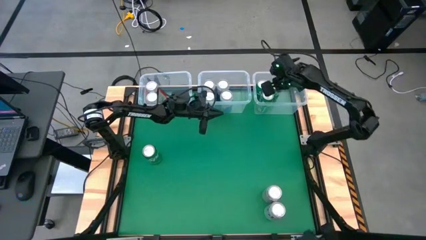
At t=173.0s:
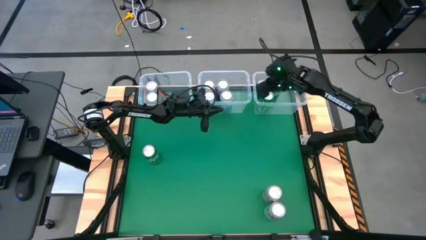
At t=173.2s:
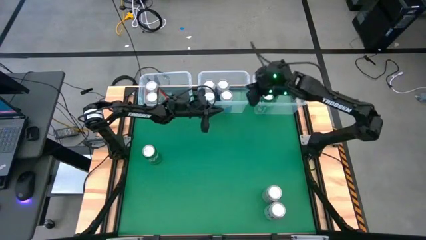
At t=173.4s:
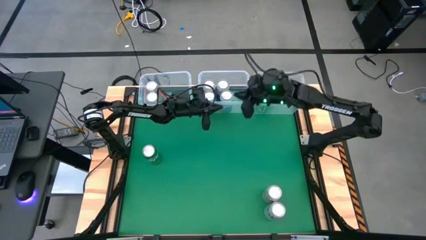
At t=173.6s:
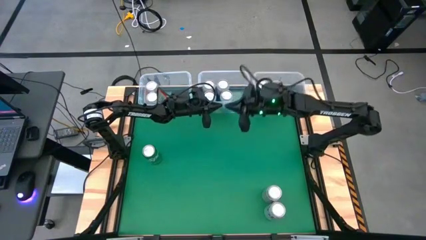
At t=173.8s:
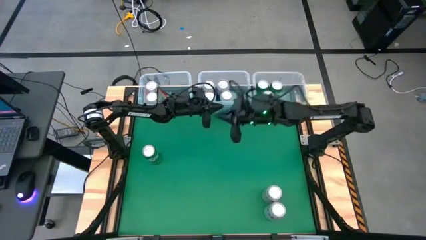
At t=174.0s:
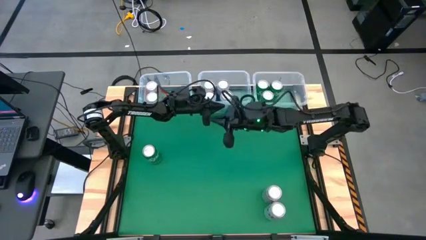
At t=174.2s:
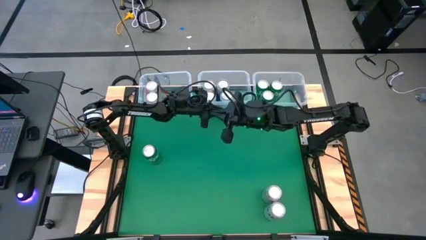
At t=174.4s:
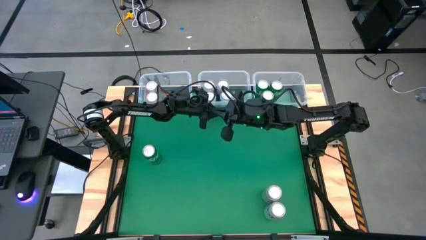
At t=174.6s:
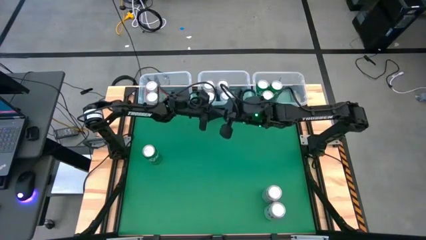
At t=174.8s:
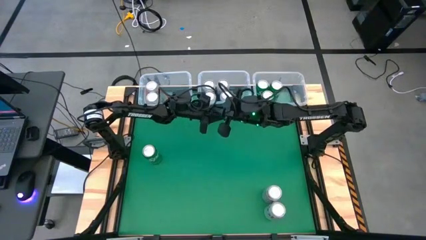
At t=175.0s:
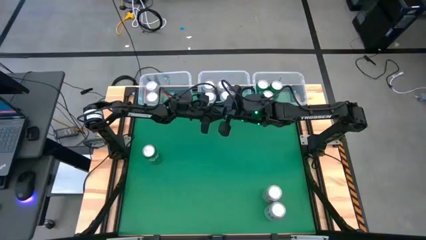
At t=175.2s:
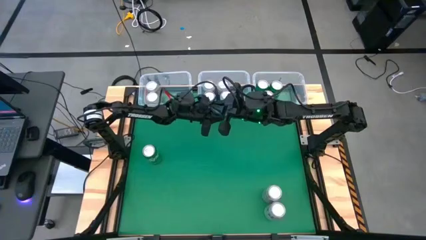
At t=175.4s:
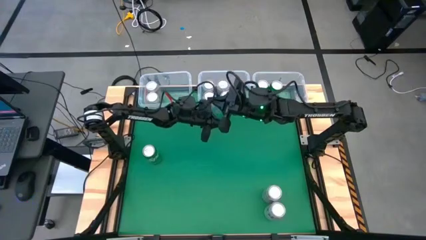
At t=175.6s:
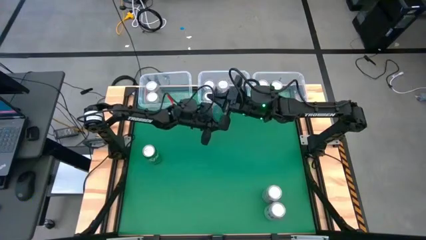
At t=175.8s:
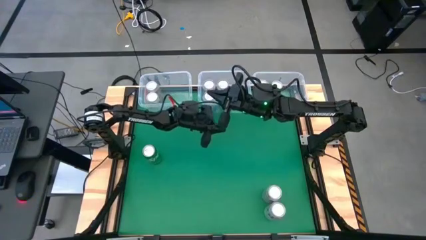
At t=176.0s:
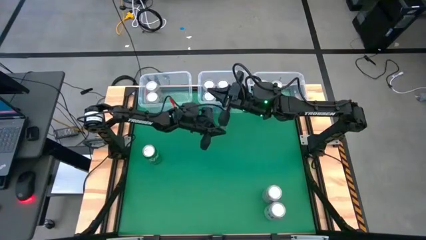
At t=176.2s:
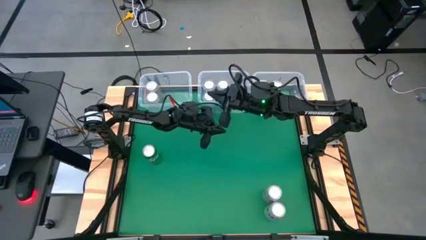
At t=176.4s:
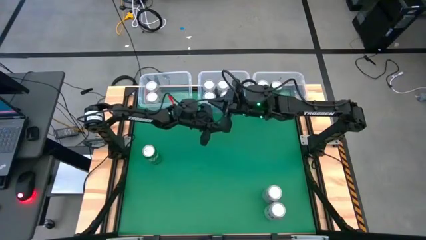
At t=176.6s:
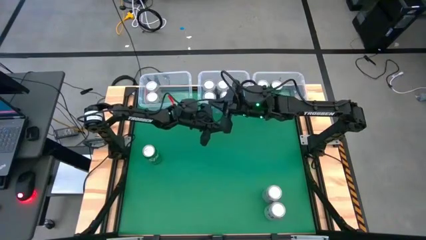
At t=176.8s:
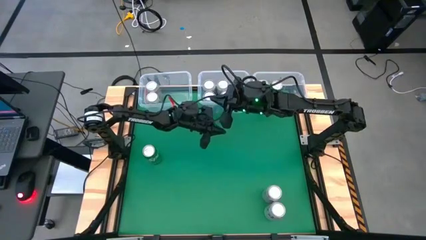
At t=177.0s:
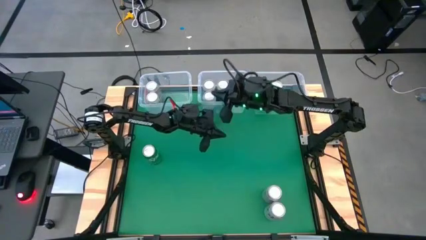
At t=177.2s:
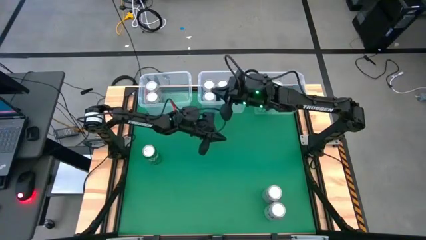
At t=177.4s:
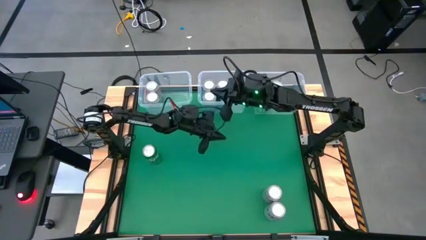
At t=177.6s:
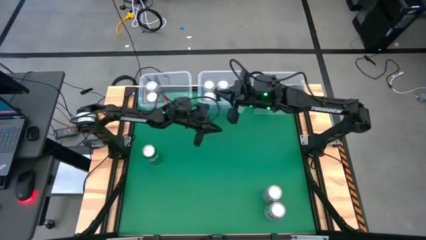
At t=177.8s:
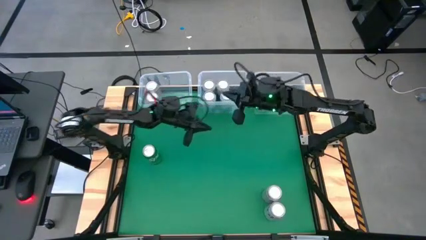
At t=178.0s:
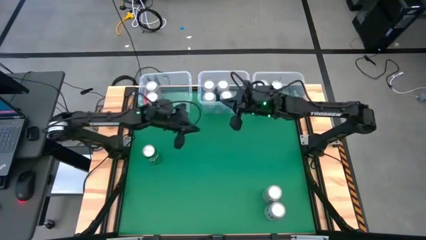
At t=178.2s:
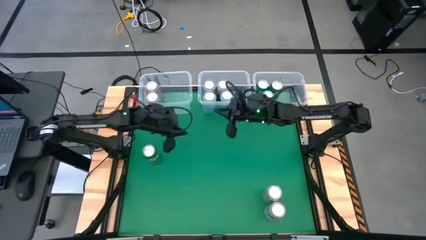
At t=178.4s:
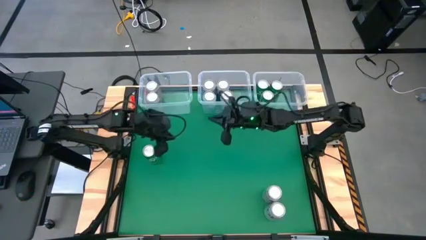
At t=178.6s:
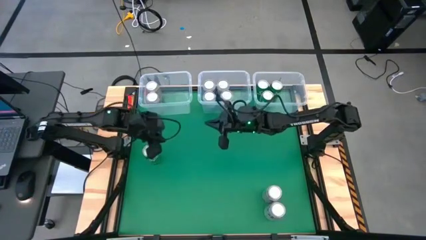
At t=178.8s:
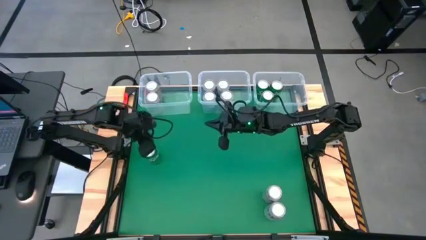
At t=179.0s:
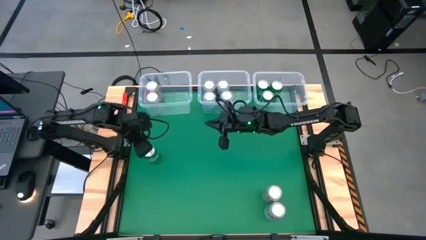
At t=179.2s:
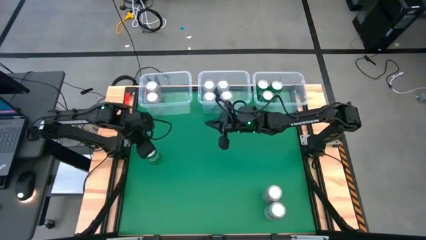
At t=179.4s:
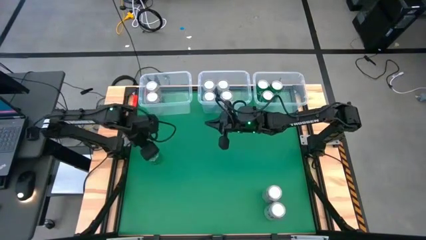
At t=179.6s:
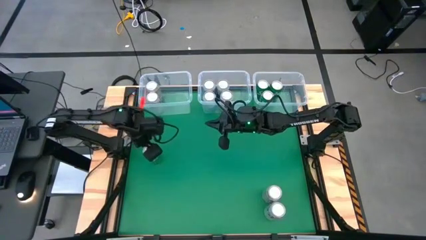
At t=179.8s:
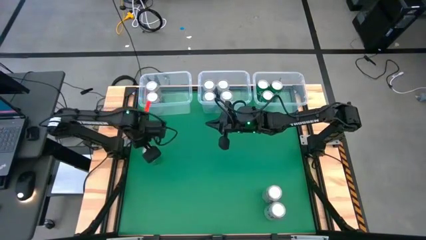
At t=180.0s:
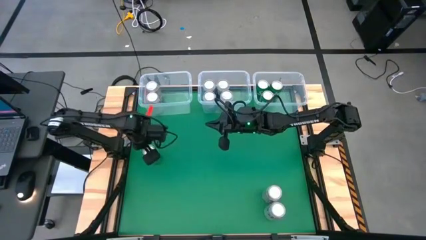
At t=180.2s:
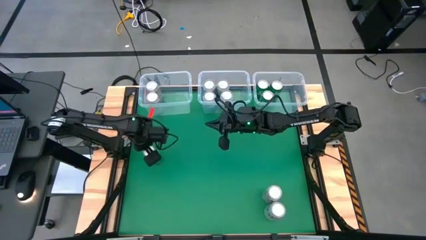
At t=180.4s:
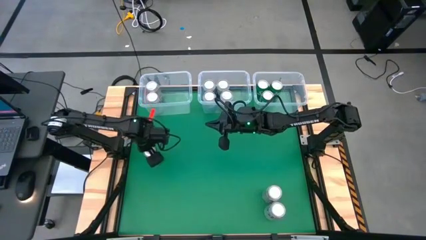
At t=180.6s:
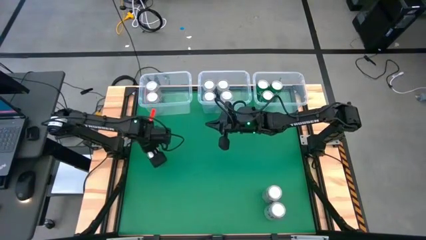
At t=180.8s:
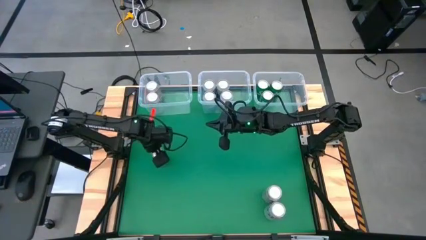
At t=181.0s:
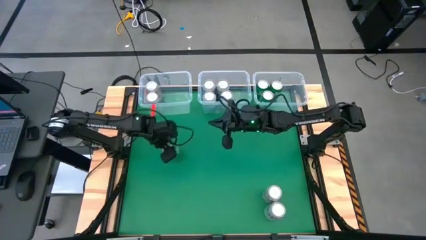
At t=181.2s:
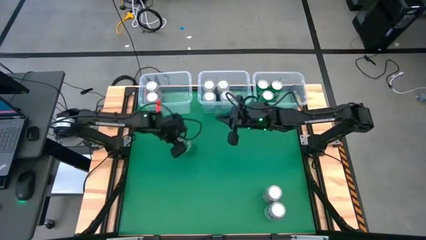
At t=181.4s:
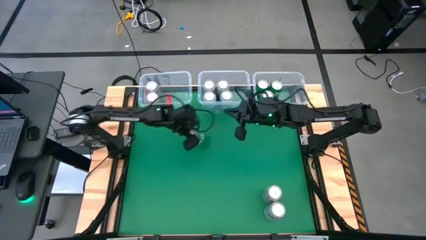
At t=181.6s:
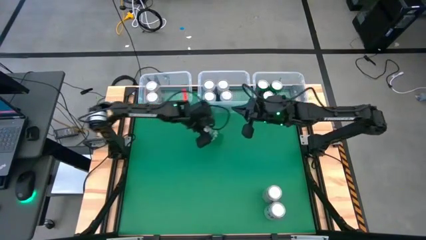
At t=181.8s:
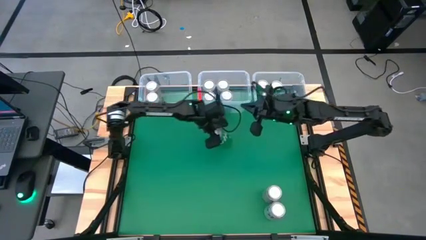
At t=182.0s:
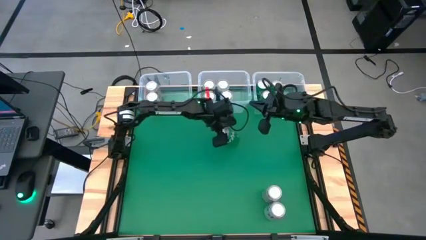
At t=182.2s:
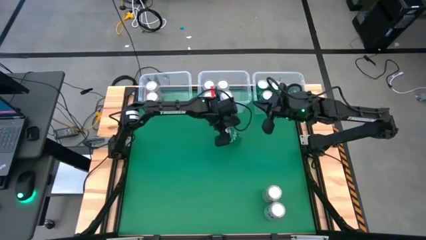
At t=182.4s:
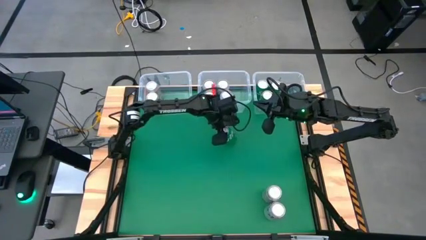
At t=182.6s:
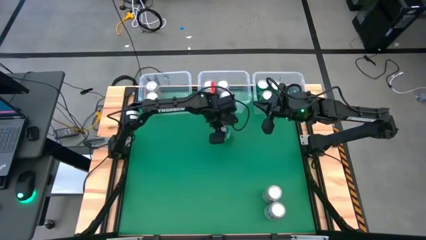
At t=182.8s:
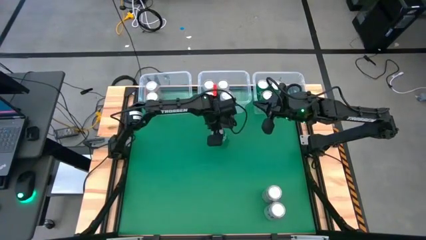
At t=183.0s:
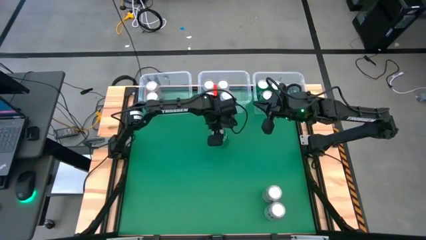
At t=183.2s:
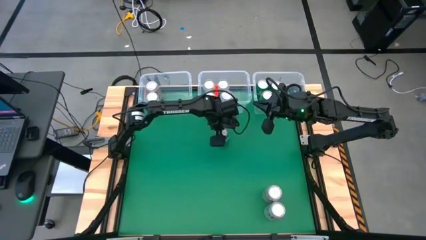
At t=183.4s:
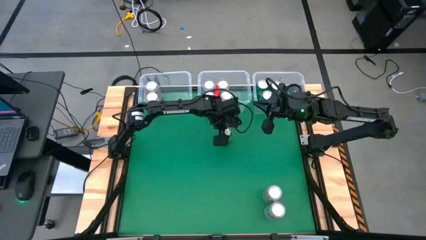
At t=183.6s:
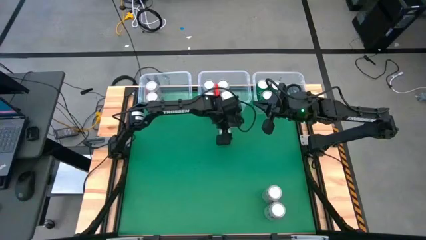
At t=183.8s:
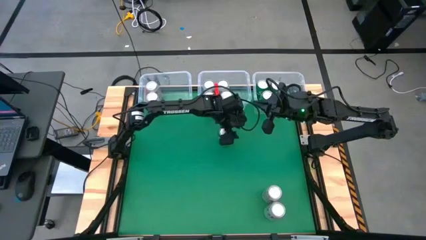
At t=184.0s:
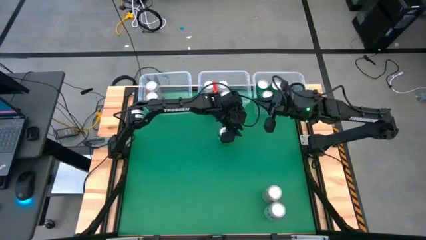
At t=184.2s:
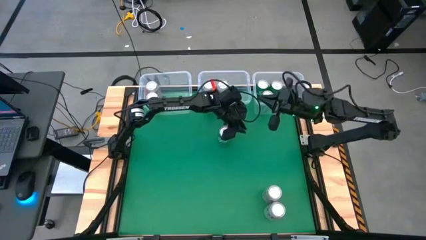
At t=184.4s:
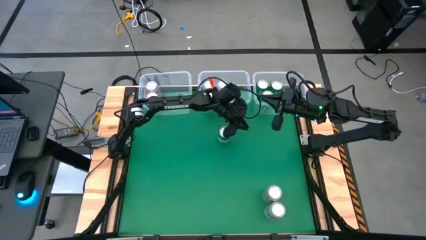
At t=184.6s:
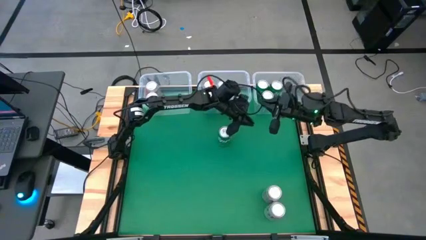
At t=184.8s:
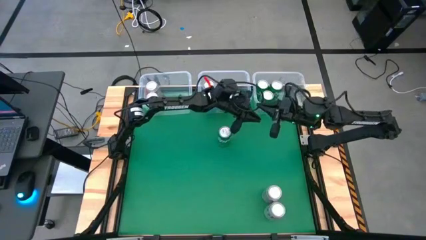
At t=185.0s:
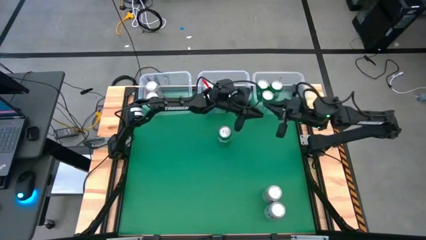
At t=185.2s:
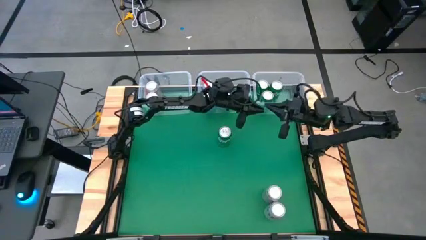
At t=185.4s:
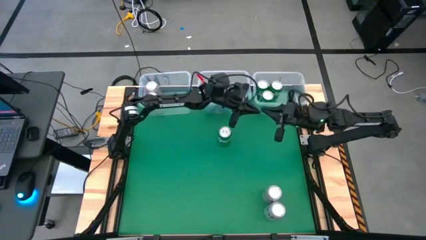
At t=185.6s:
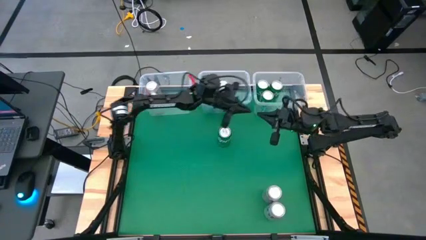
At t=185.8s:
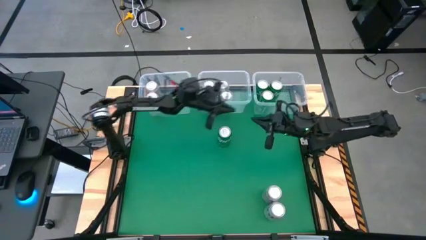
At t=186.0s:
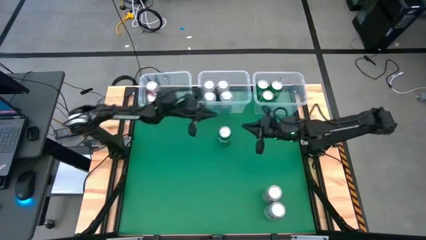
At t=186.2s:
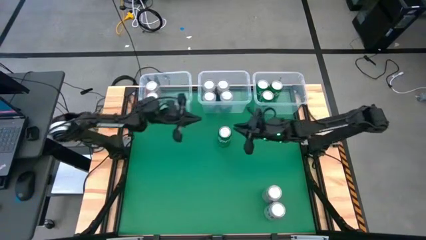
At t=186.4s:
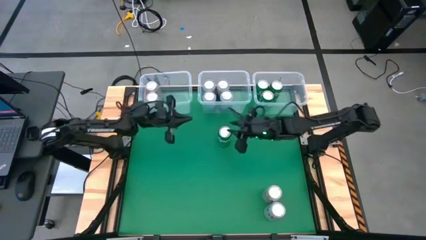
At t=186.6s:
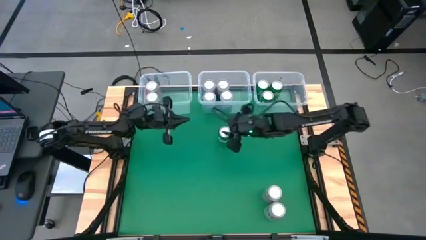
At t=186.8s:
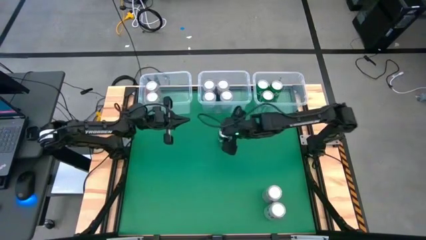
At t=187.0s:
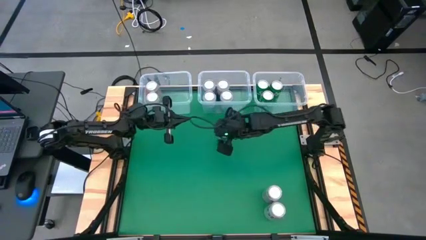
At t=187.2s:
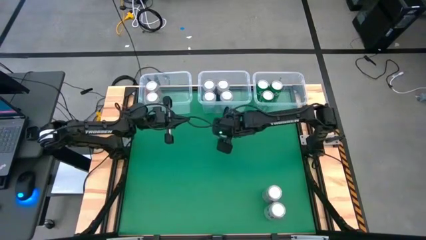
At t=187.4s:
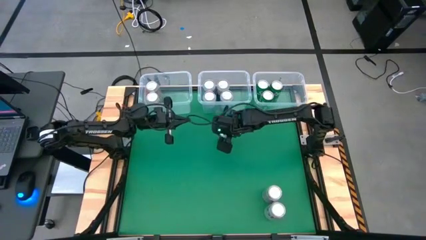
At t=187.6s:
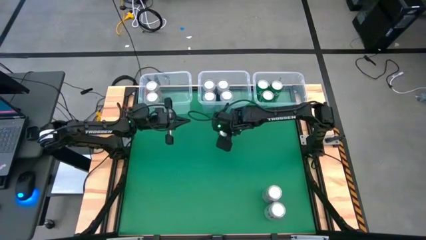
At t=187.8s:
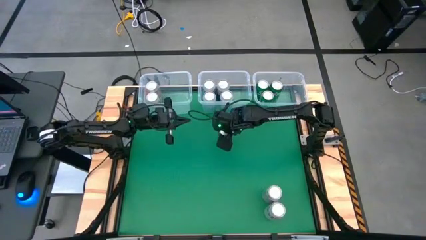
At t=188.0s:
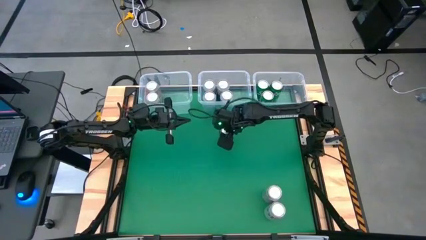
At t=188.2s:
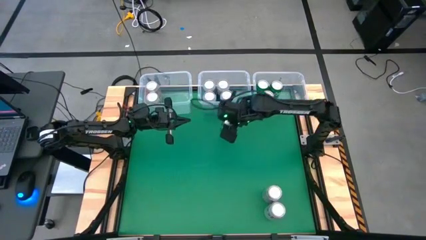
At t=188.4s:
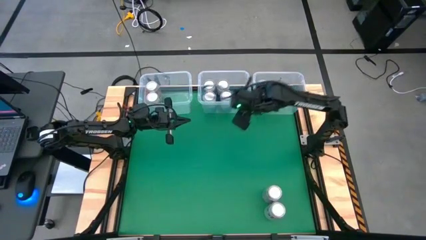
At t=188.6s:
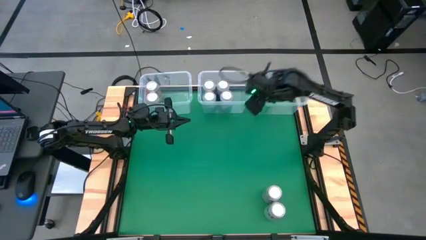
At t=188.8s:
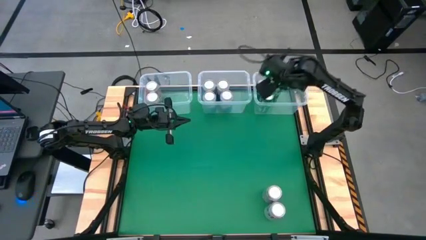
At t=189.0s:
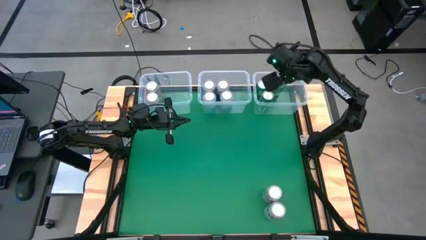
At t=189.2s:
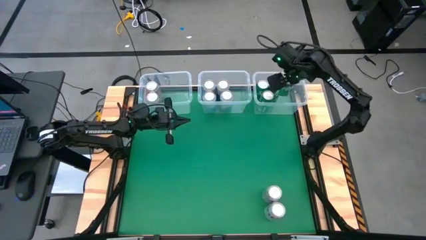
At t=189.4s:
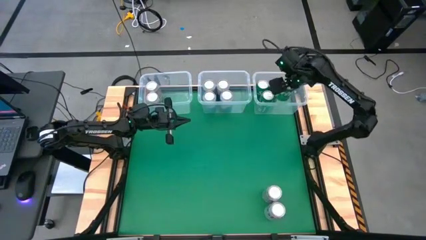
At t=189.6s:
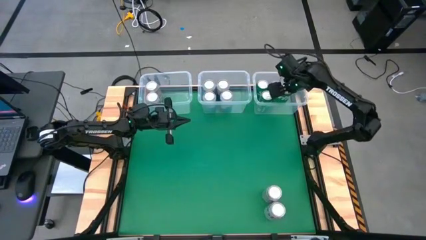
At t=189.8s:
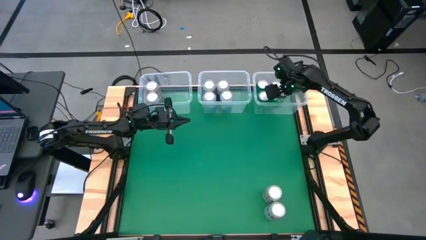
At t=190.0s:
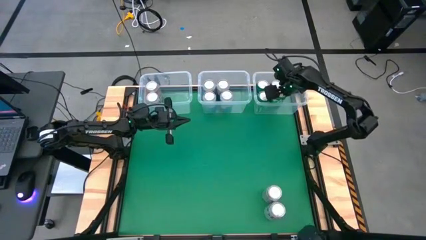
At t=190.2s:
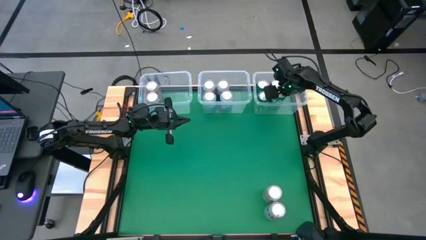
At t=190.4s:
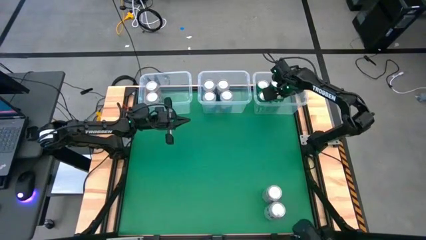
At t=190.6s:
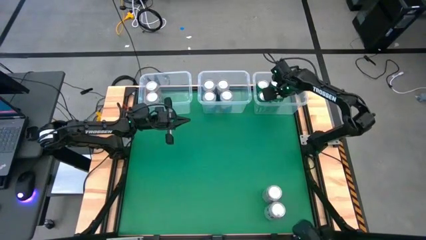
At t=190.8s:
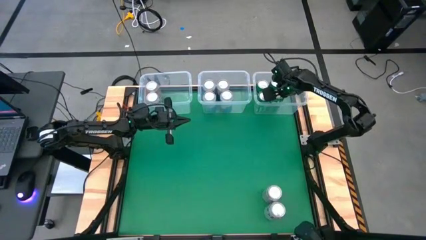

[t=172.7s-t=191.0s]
Task: Sort soda cans
Put the green soda can into the right transparent bin
